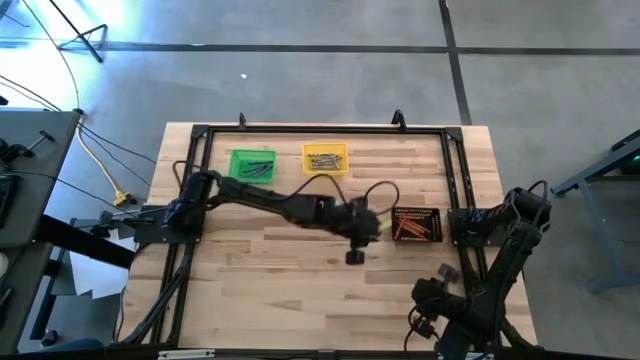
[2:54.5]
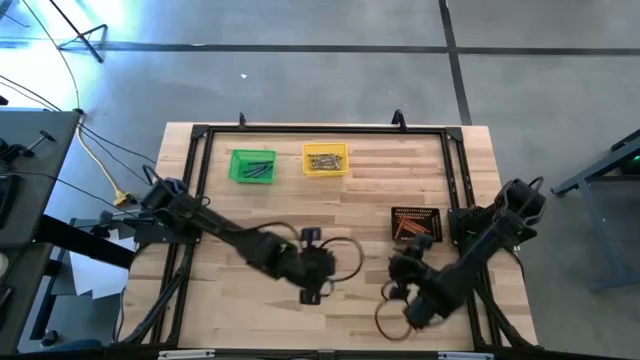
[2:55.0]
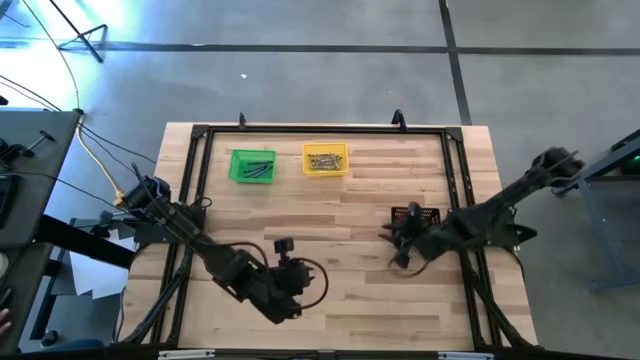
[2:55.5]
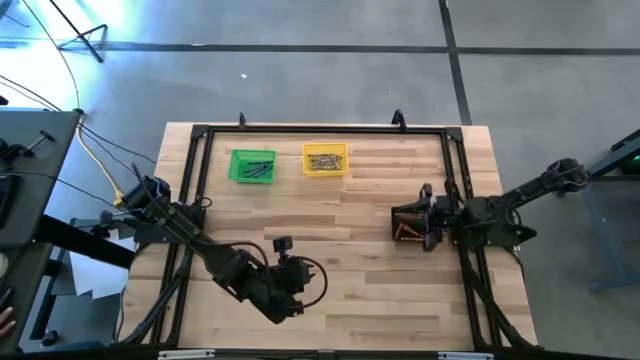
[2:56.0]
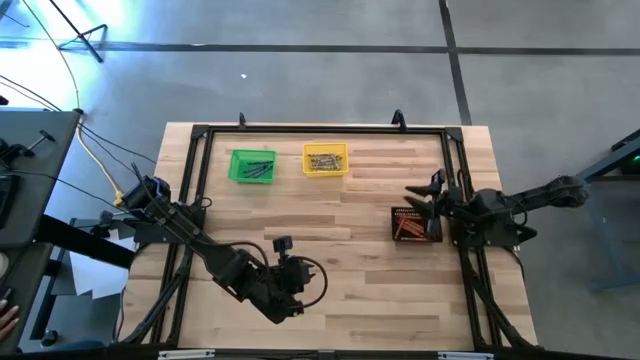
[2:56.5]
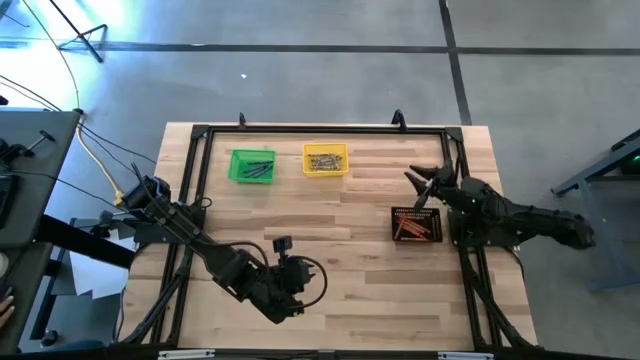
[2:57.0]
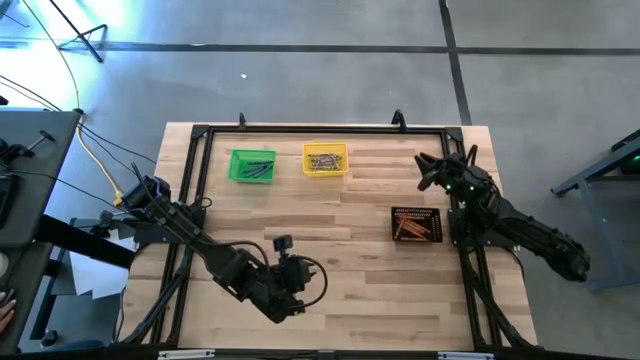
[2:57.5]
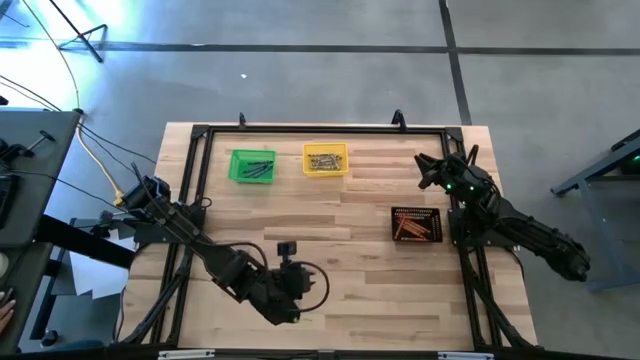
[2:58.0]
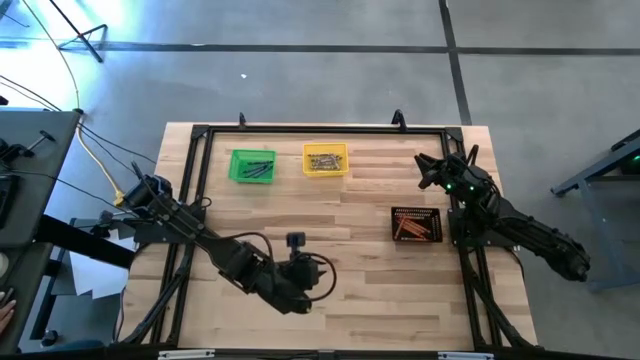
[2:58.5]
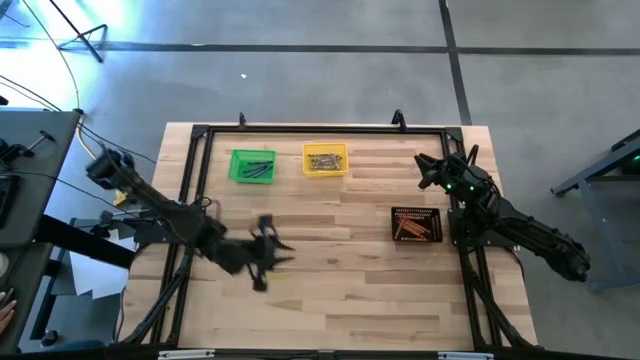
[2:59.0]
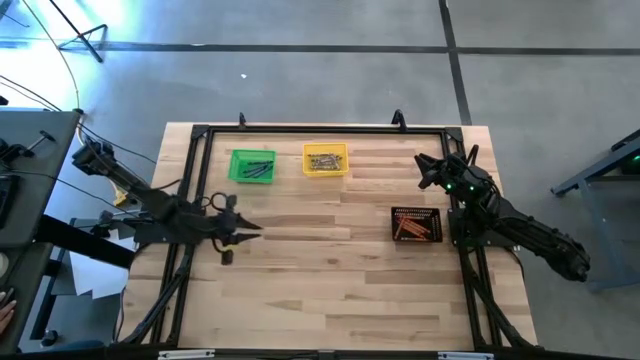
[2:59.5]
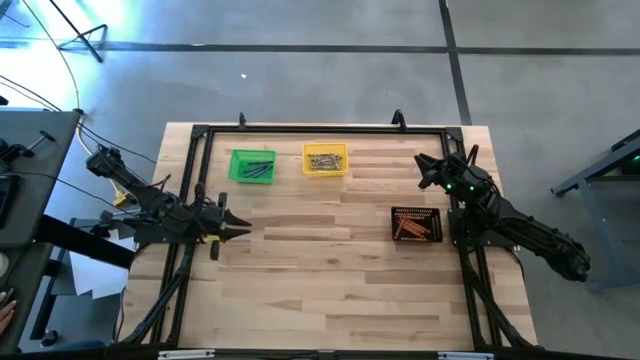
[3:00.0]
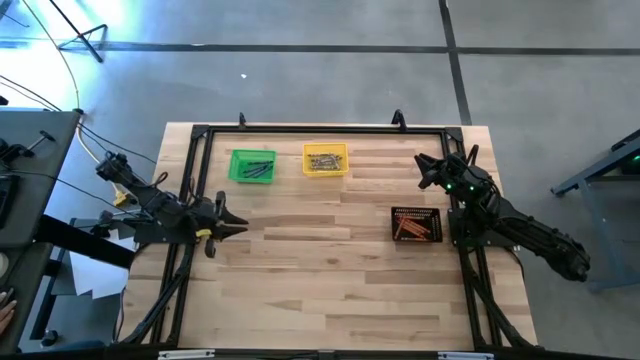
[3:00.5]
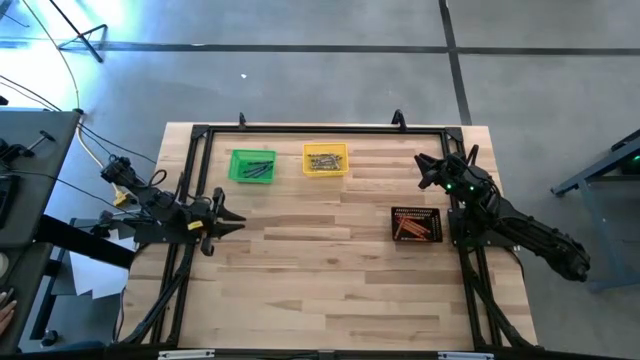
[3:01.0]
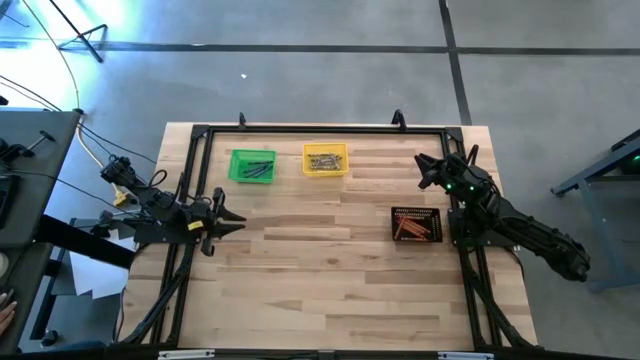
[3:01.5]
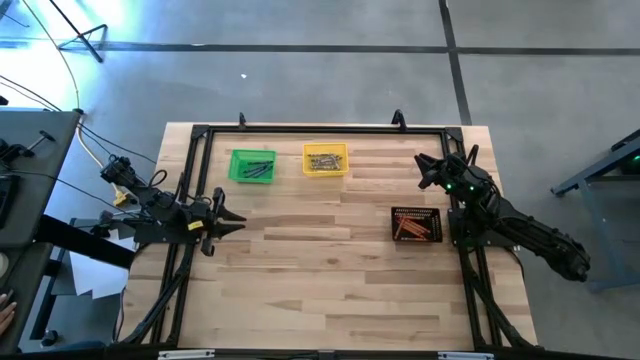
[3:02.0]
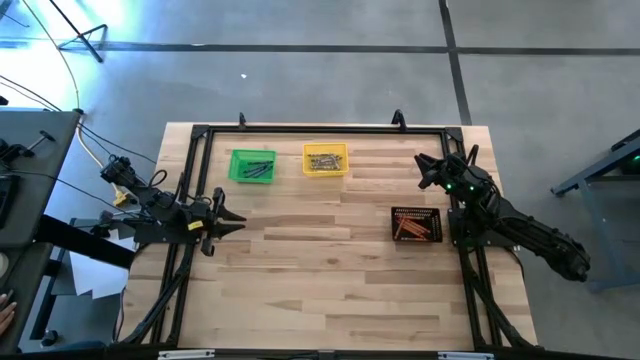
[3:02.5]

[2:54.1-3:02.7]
Task: Sort crayons
Return to Home Position

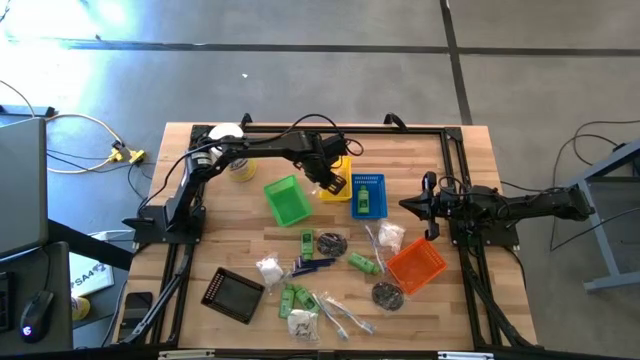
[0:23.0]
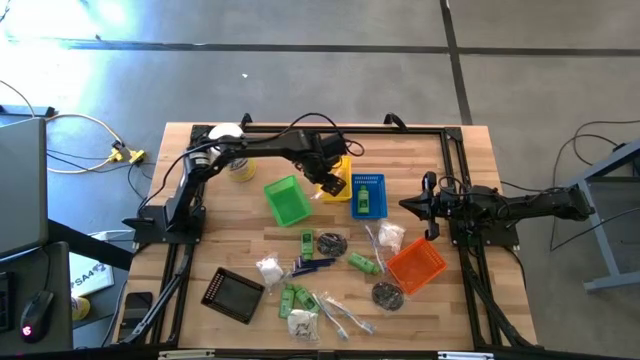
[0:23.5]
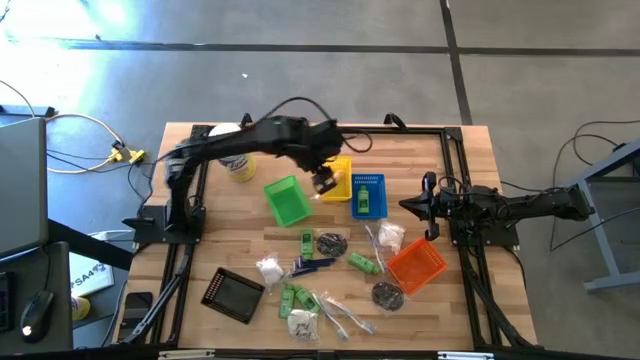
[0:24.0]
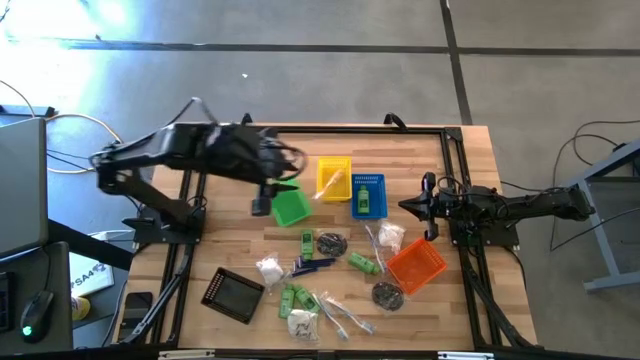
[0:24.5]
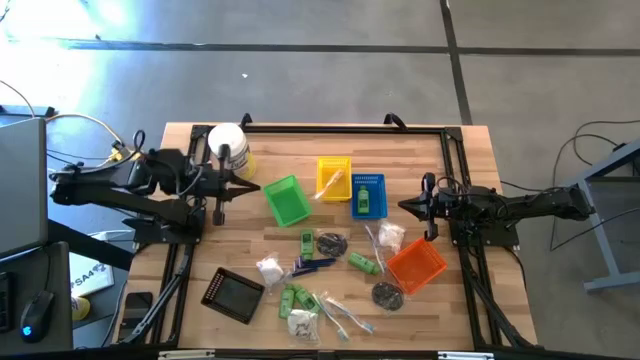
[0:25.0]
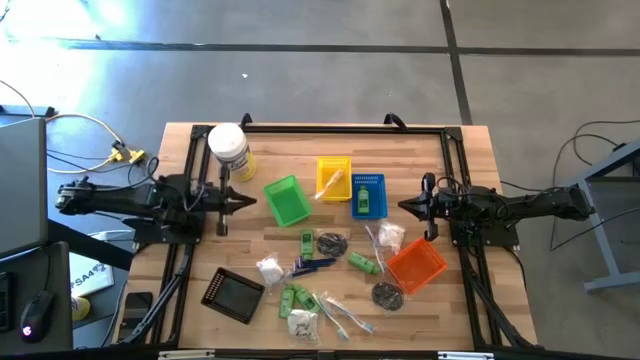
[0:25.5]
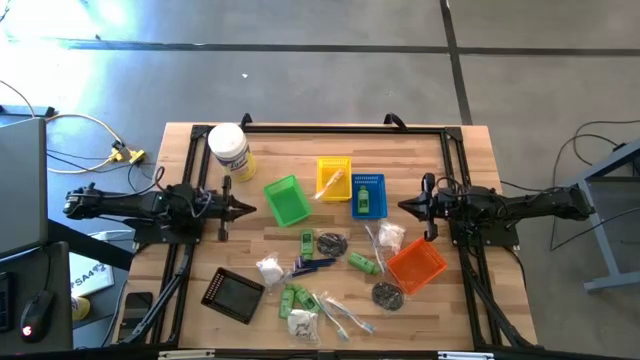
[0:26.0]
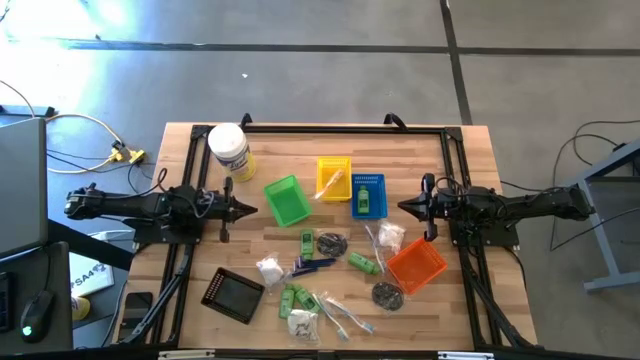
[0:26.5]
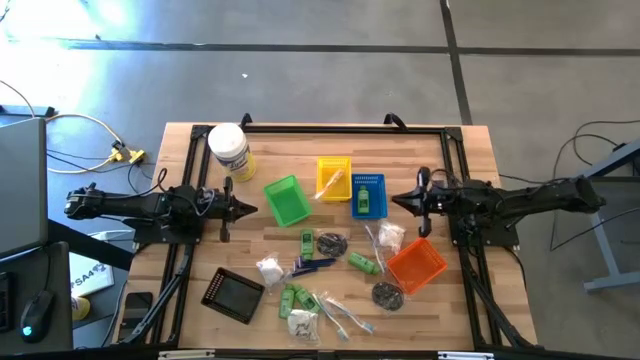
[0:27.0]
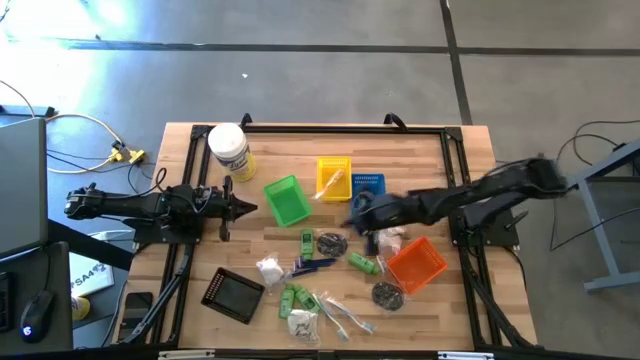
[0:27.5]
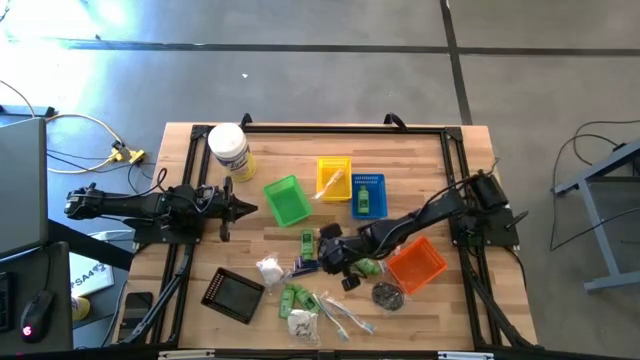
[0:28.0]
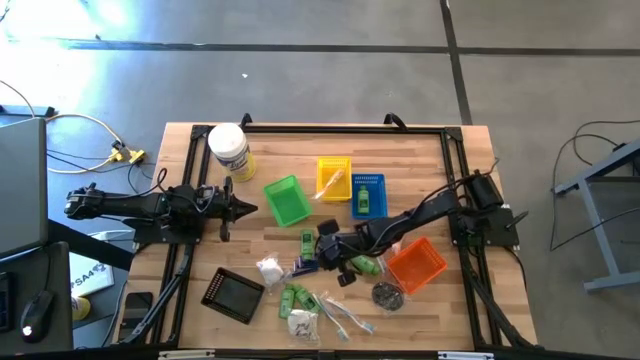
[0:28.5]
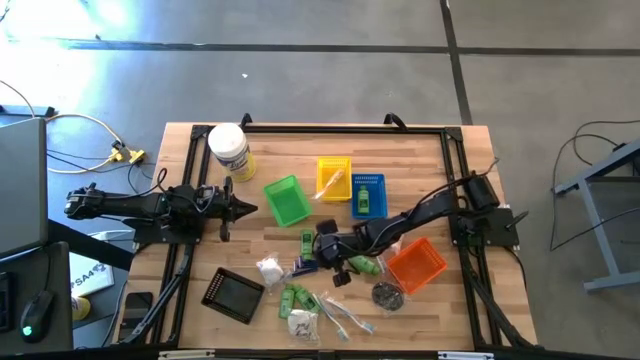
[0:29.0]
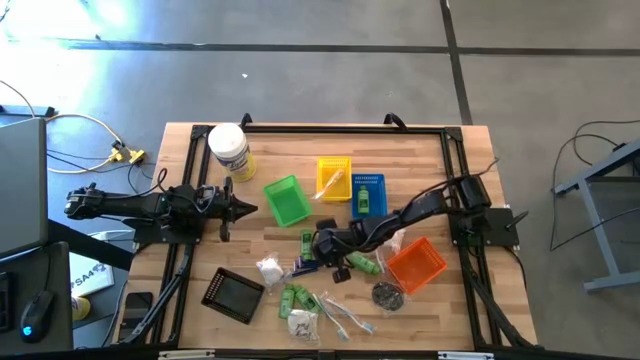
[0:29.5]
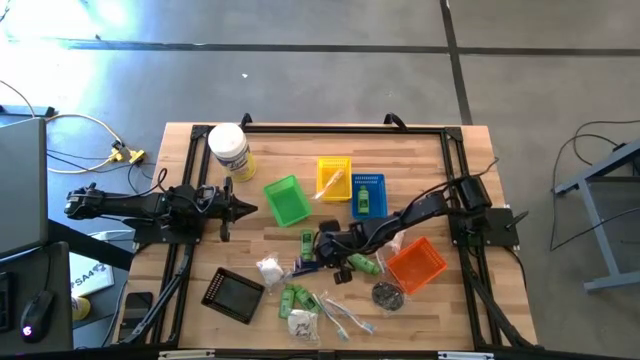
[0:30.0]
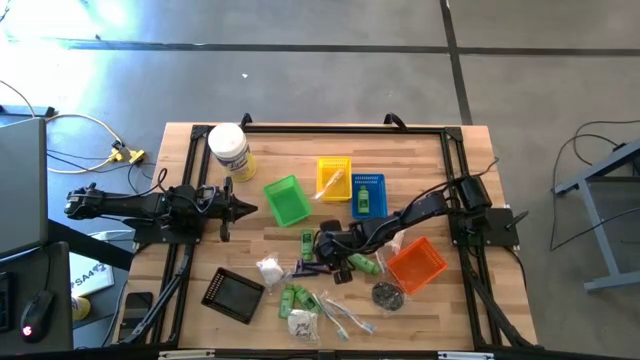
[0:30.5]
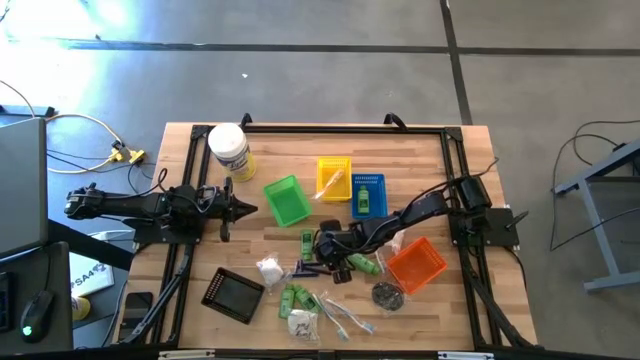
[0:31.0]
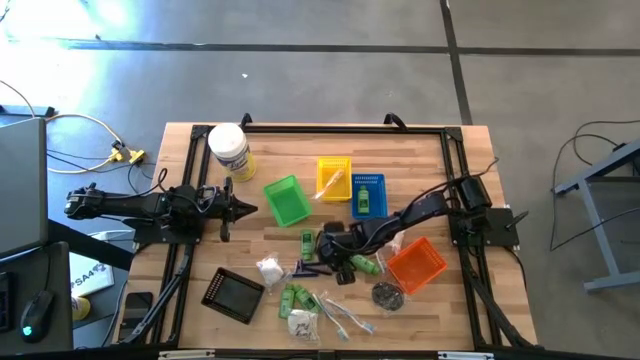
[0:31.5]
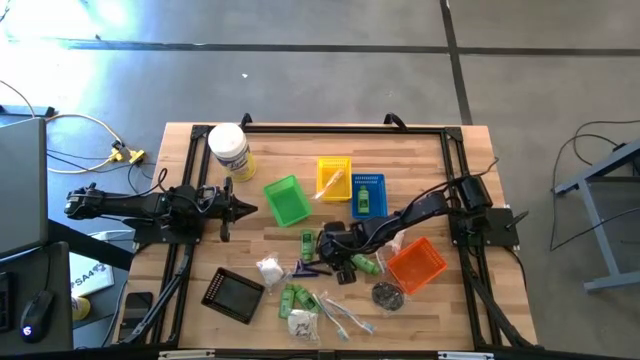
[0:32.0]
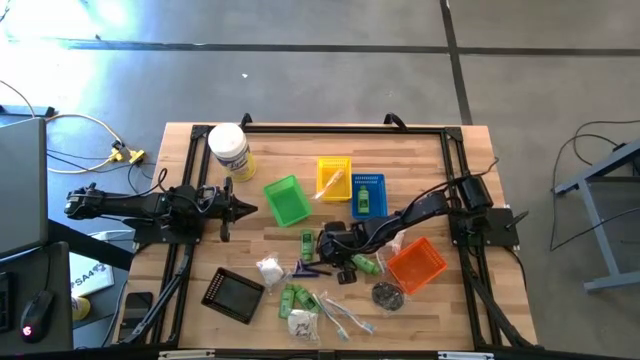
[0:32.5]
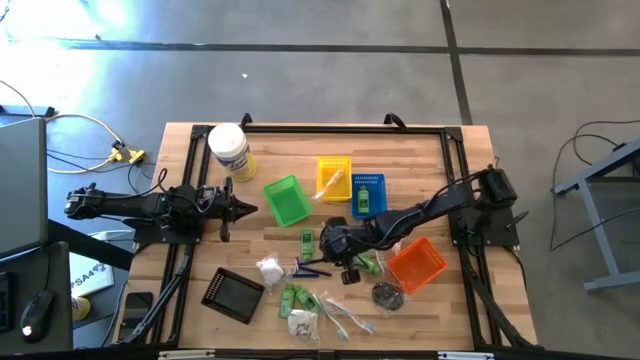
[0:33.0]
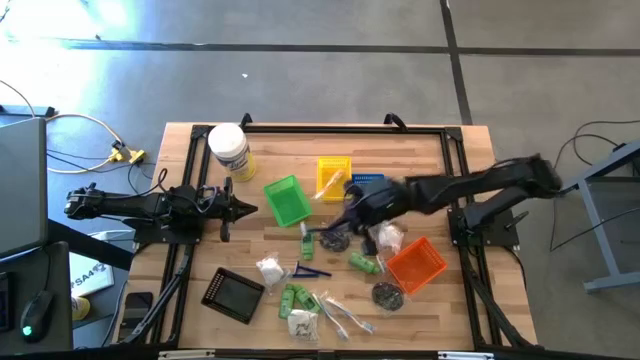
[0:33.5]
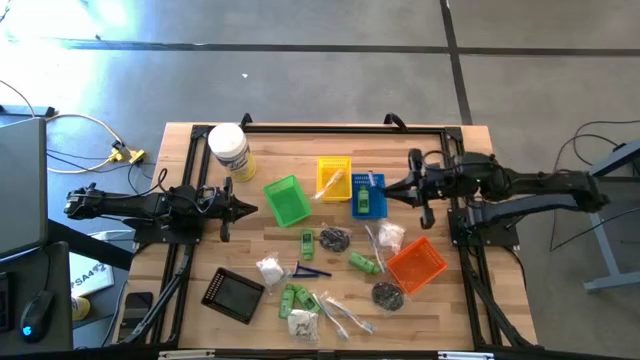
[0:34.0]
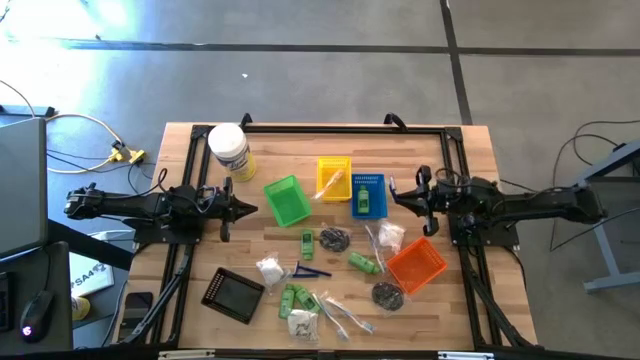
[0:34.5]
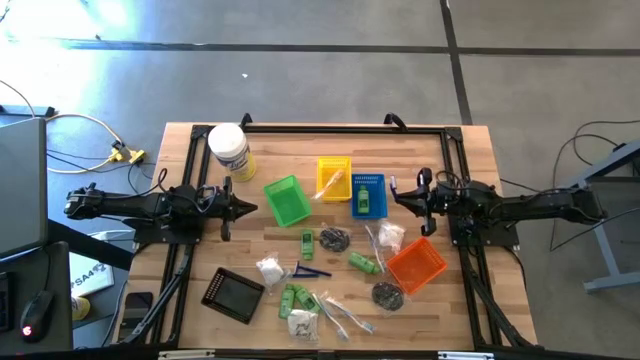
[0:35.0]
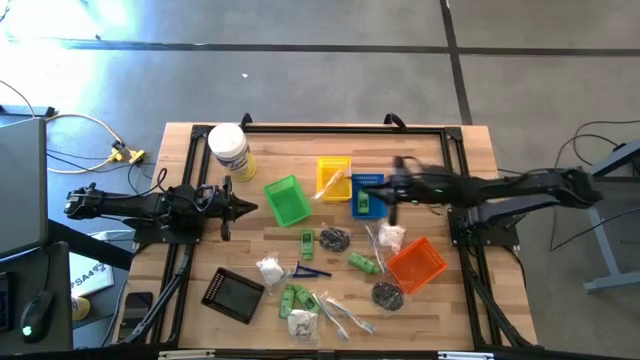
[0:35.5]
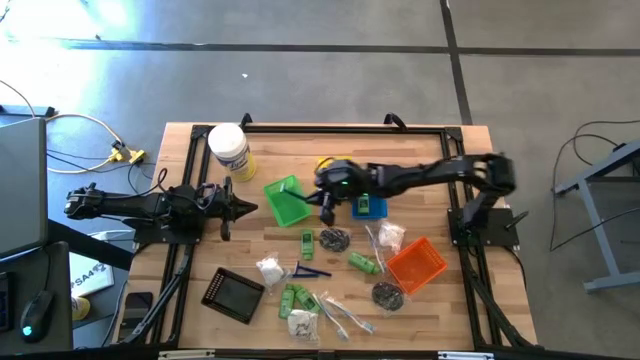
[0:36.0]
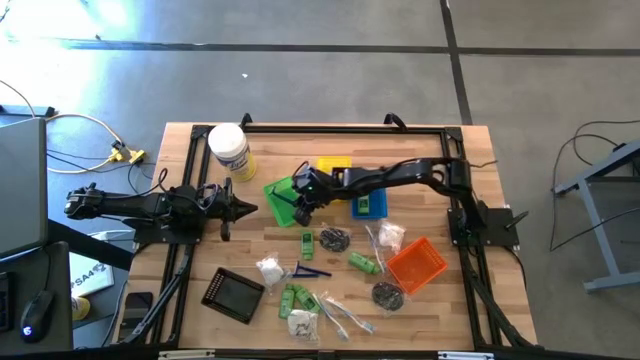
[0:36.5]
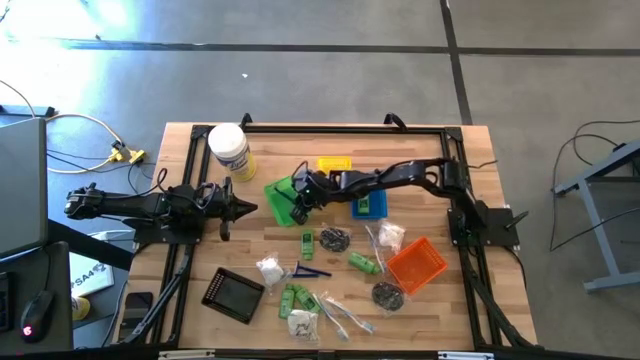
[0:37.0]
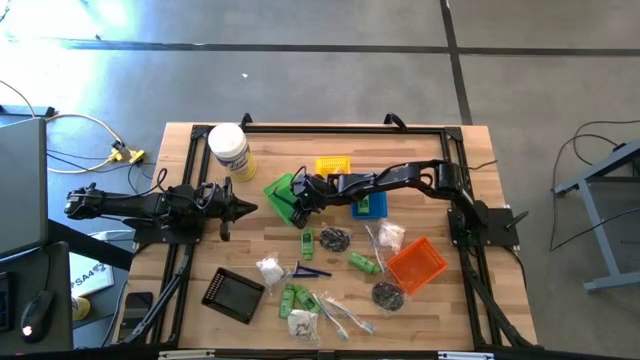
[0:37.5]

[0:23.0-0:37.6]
Task: Pick & Place Travel size toiletries
Put the blue razor into the green basket
